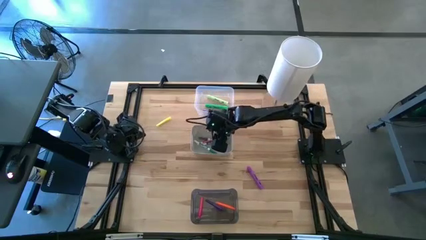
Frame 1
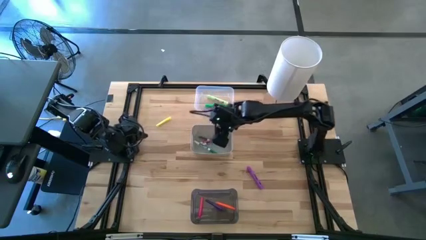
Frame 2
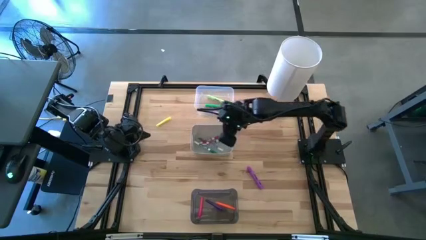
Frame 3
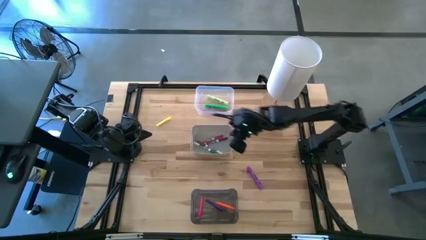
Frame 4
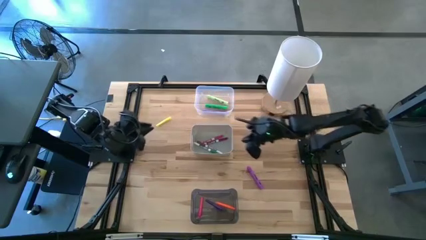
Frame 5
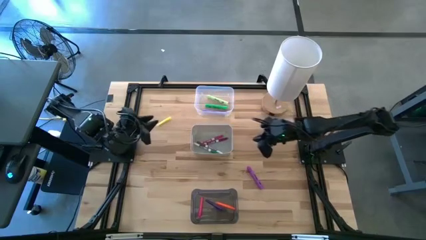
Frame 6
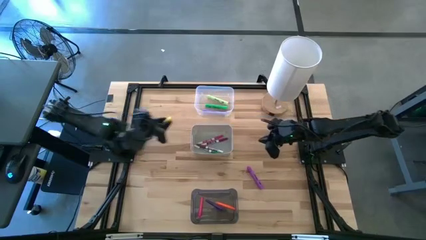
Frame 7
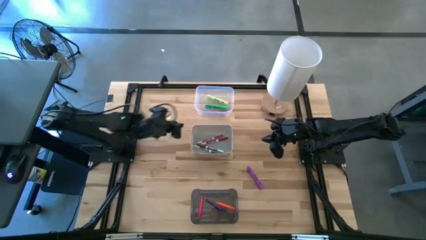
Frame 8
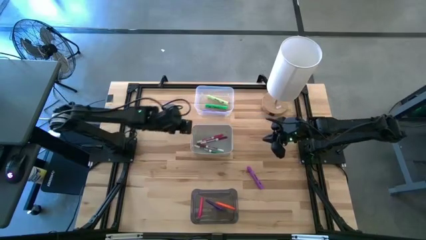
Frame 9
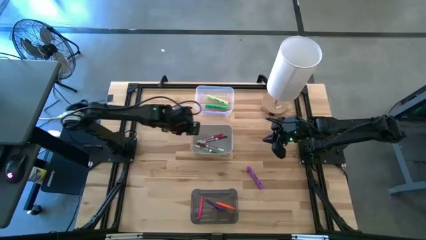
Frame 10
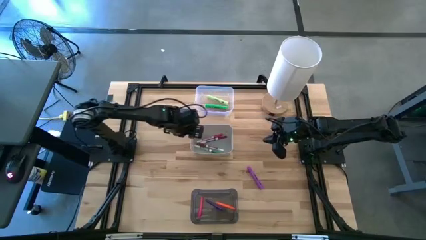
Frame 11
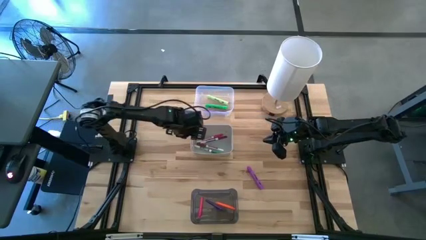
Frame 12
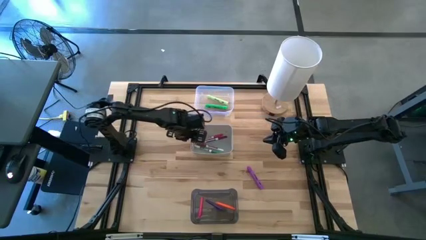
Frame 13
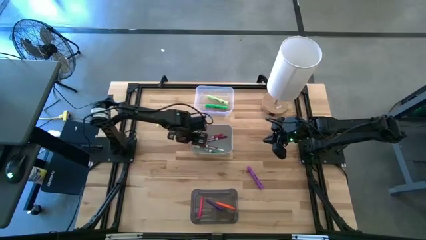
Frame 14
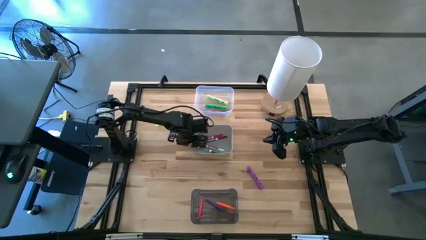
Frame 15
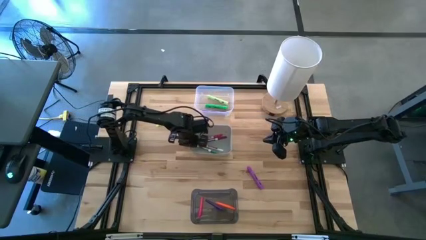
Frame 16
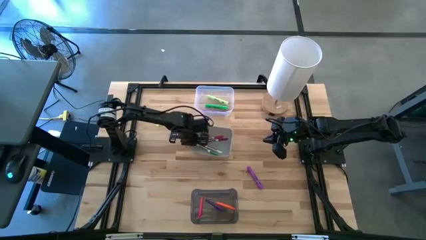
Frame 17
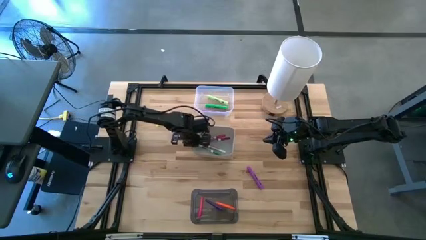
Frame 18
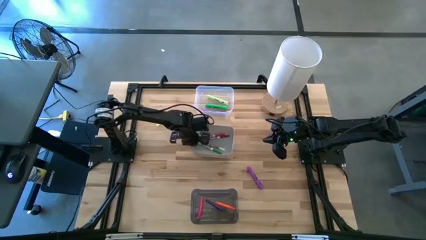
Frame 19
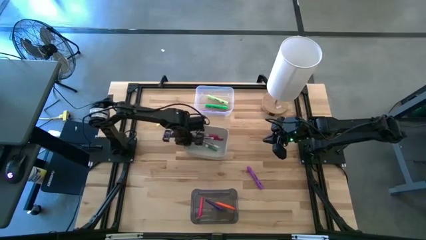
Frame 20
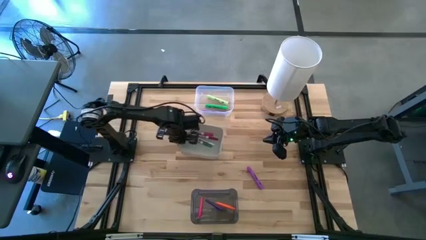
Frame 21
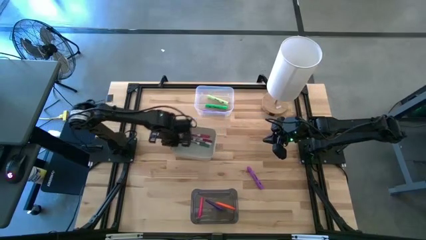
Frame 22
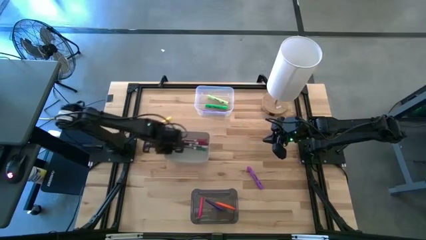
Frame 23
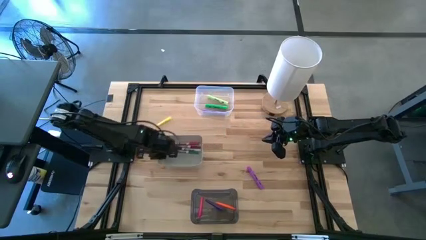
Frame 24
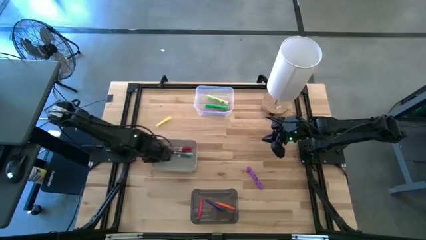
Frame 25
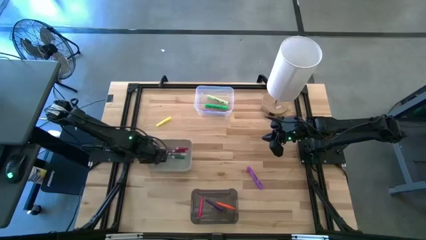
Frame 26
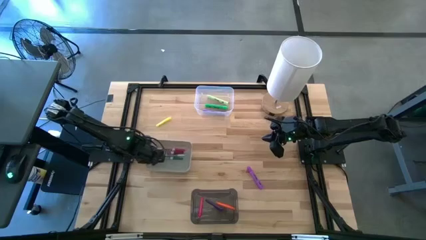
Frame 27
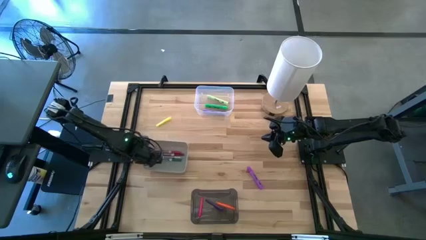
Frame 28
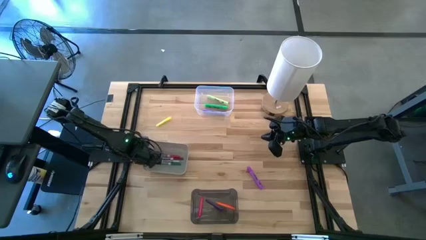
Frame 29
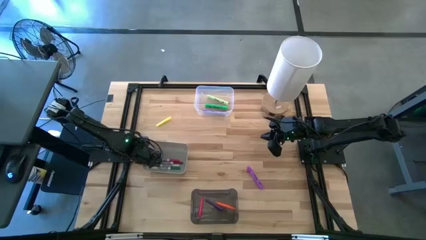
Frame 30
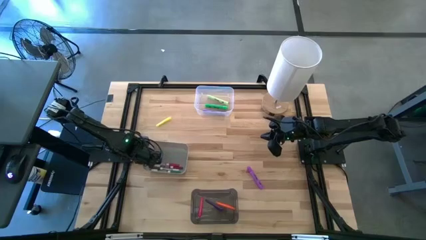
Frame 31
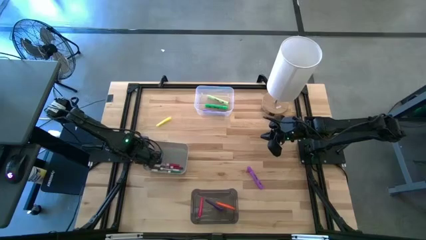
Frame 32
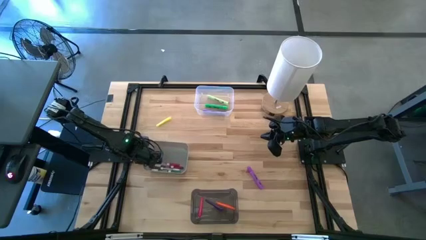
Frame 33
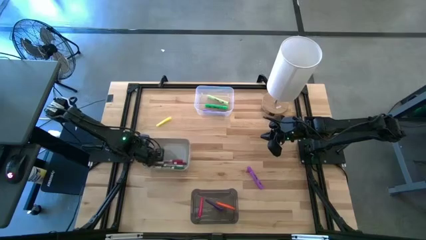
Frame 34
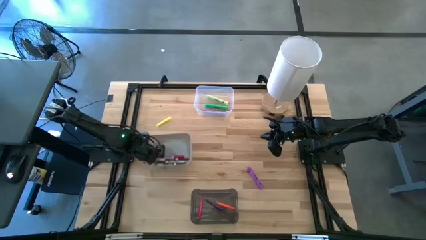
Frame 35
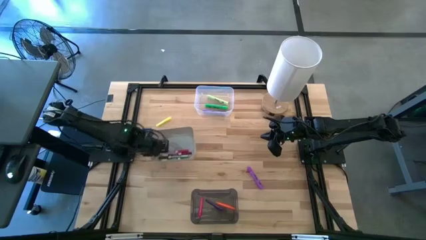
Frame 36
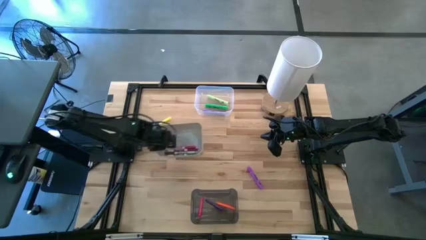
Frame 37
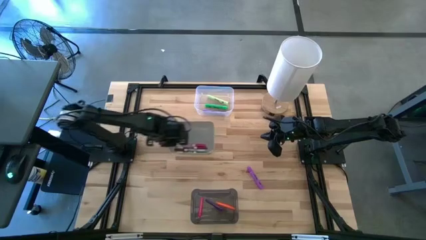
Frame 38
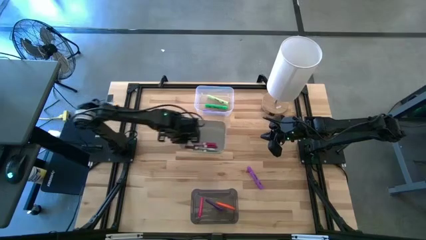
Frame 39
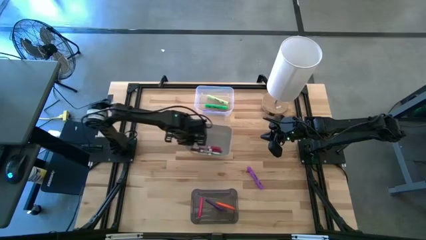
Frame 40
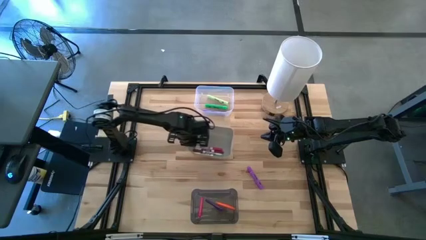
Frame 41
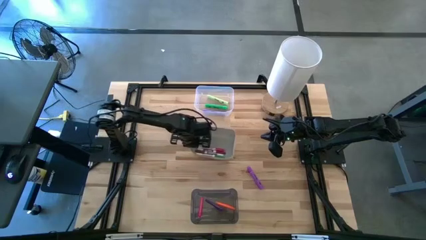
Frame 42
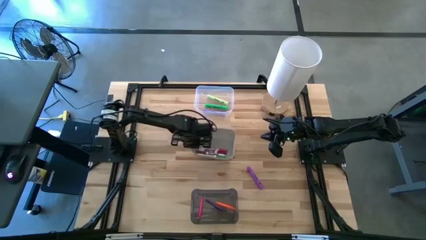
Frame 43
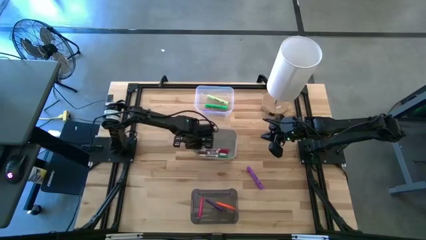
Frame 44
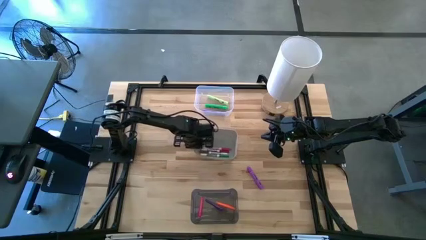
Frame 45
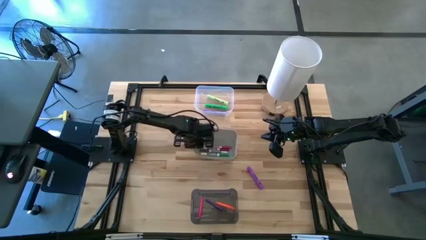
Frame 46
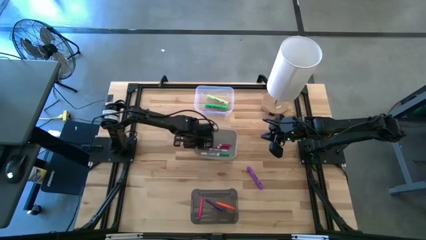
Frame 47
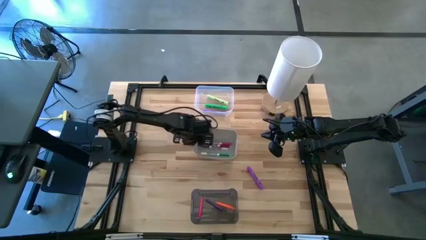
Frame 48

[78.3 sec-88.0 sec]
Task: Pick & Place Markers
Adjust the gray bin

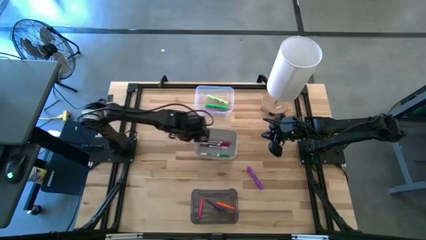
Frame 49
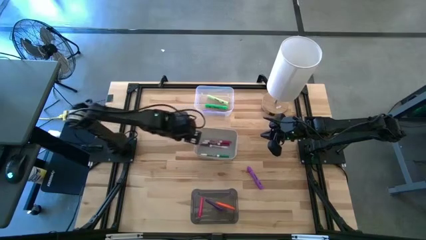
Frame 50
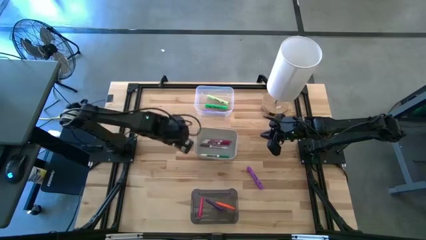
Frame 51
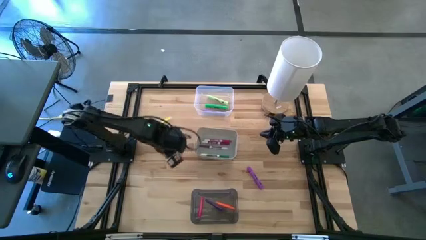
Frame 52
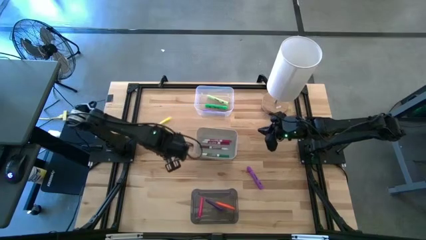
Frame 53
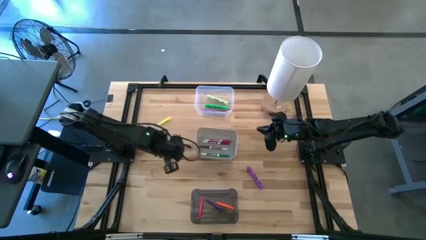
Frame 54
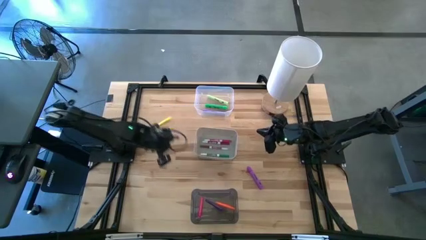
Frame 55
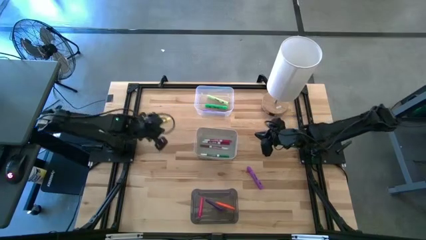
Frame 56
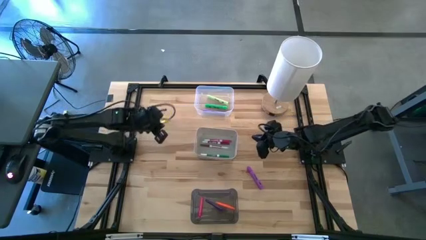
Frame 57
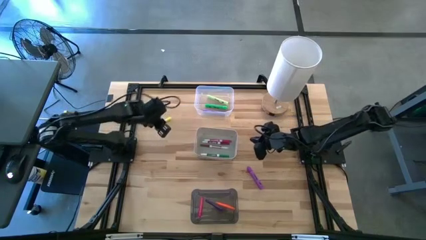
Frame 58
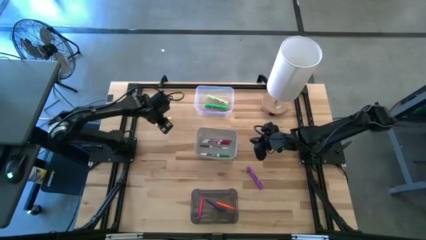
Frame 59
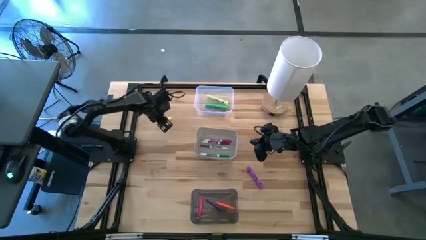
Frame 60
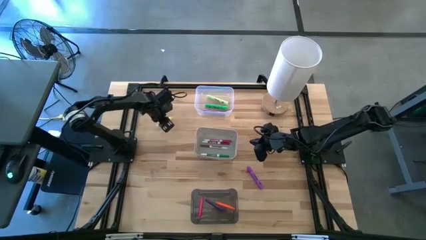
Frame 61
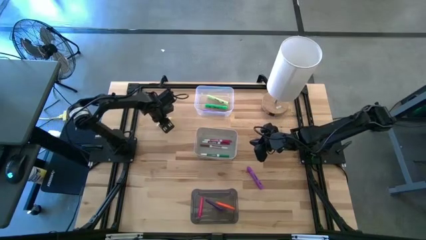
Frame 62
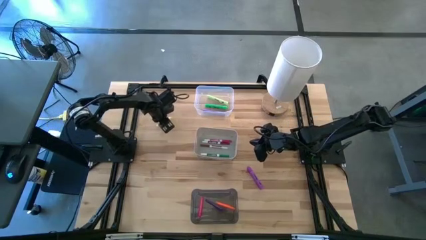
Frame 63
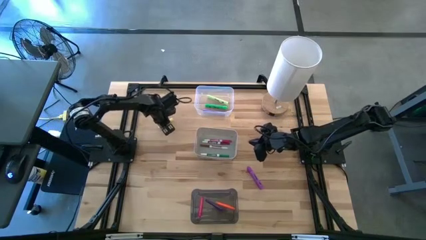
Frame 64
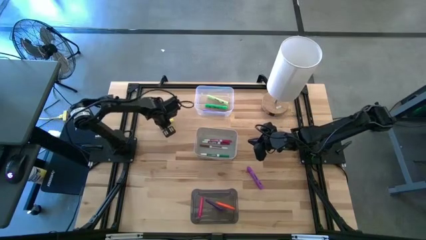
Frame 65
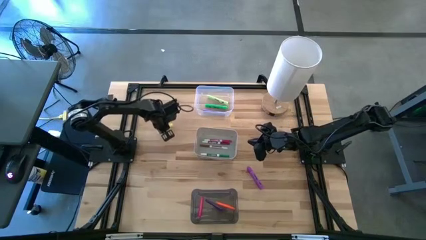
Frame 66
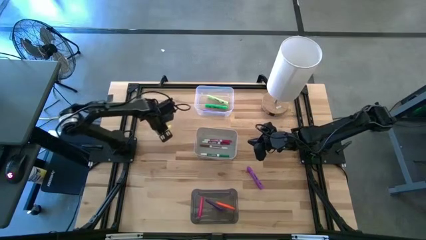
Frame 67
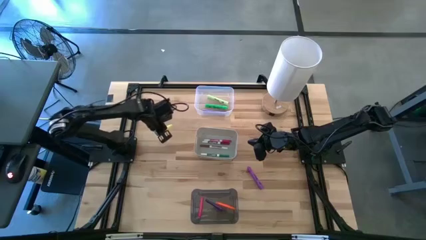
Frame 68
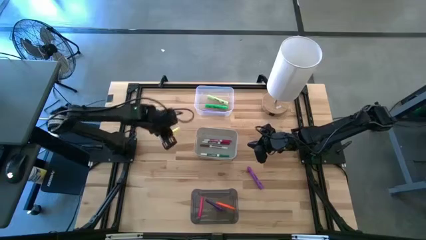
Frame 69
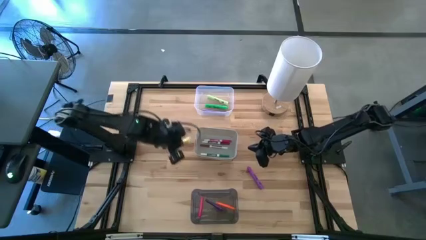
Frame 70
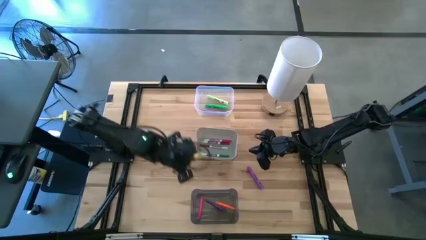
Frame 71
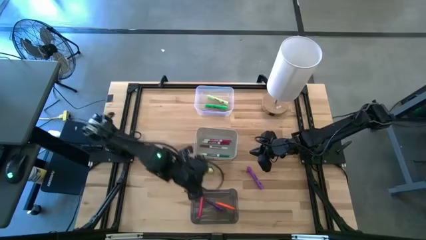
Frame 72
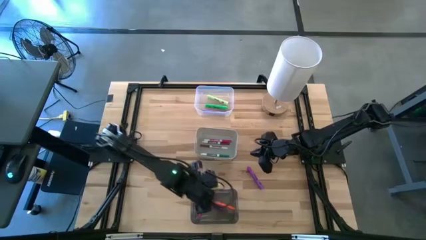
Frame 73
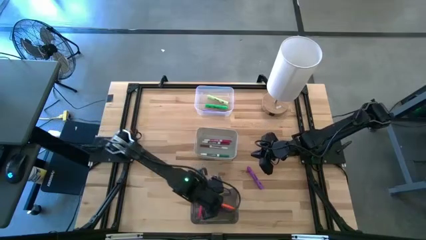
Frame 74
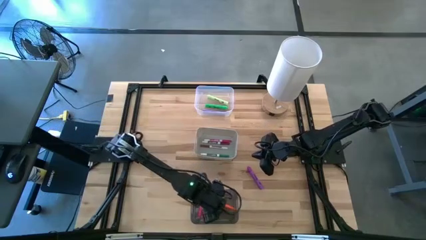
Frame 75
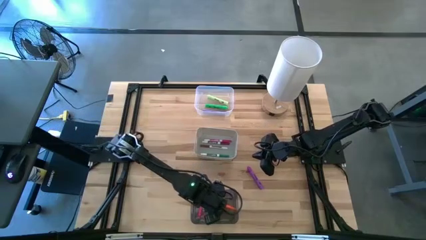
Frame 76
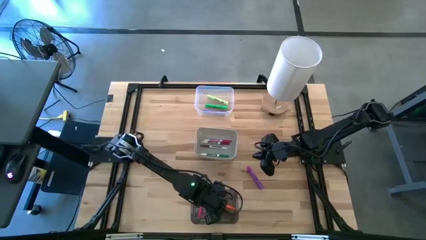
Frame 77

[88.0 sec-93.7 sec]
Put the yellow pen into the black bin

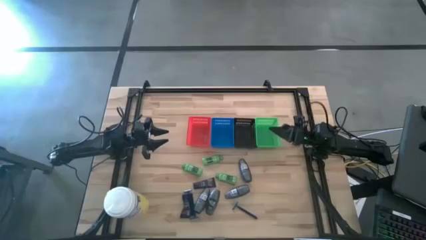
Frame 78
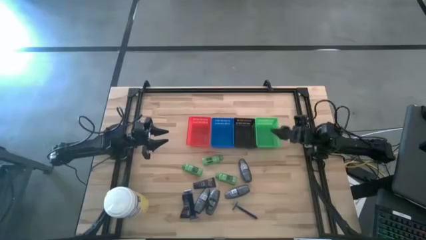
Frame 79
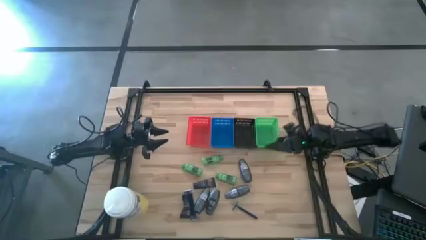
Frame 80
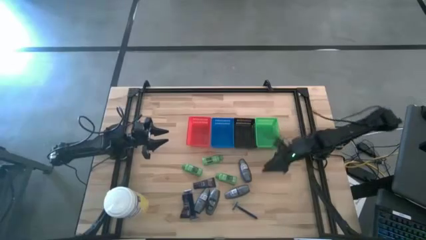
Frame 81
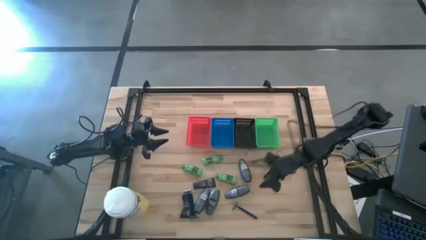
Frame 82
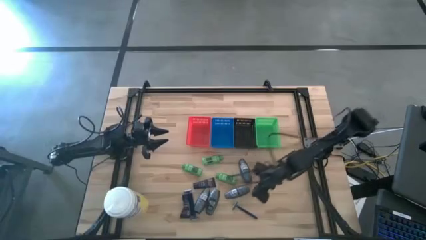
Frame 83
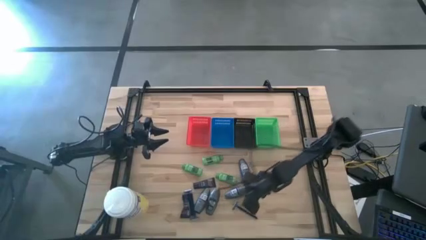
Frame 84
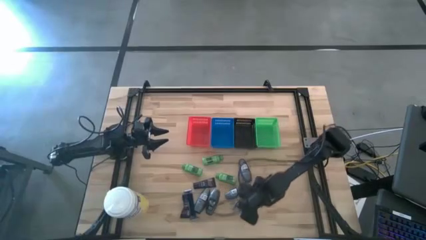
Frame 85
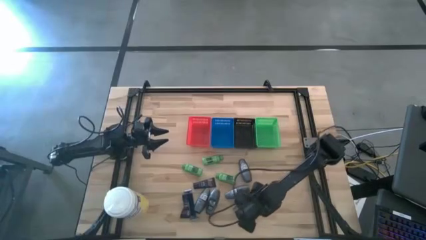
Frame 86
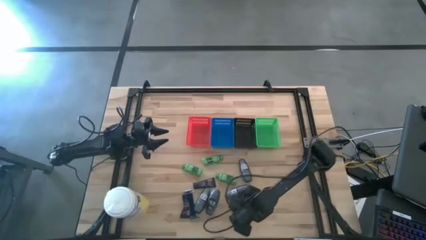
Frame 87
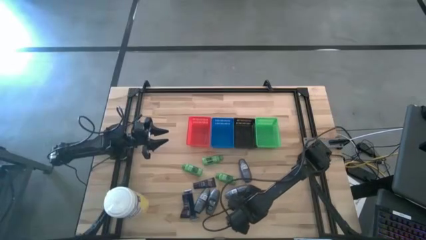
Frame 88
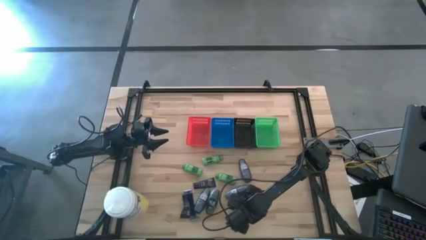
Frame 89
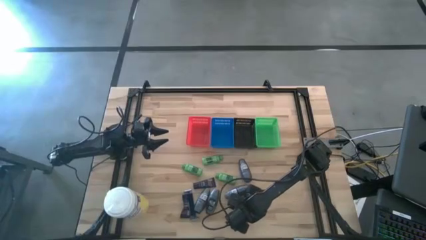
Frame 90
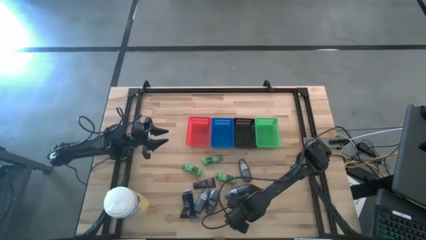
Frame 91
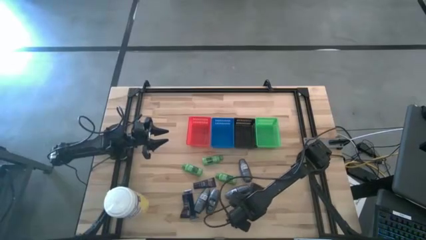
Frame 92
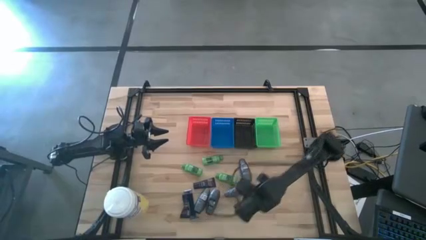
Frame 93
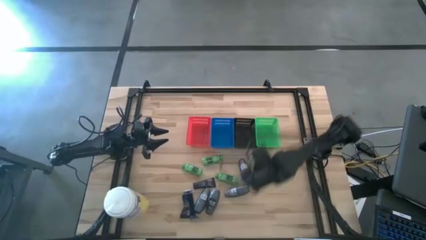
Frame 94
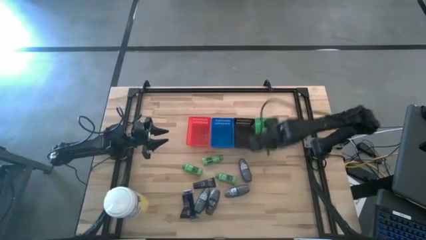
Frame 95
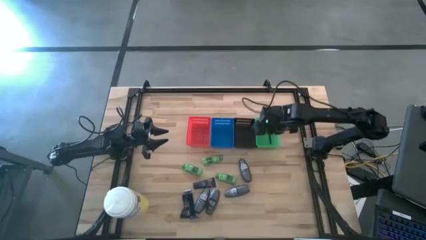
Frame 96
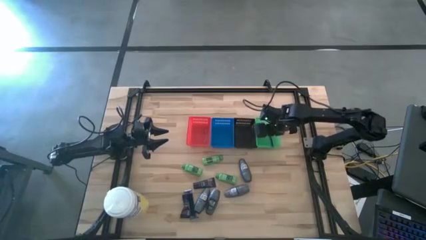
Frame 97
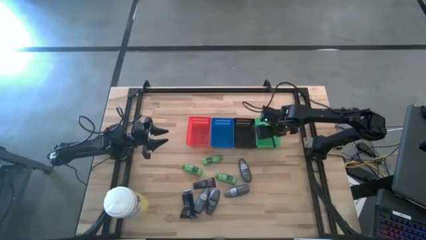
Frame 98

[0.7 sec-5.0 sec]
Task: Pick & Place Travel size toiletries
Put the blue razor into the green bin
